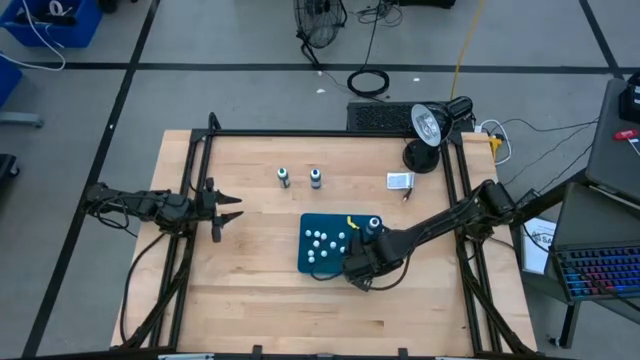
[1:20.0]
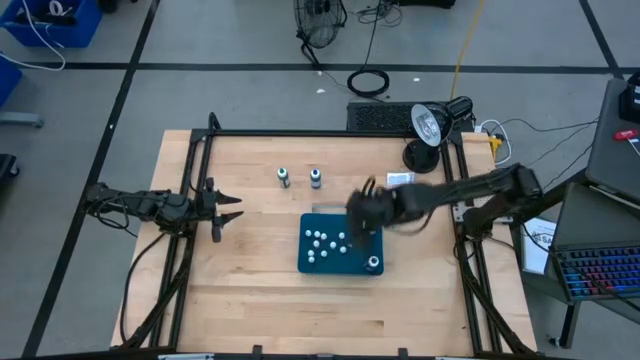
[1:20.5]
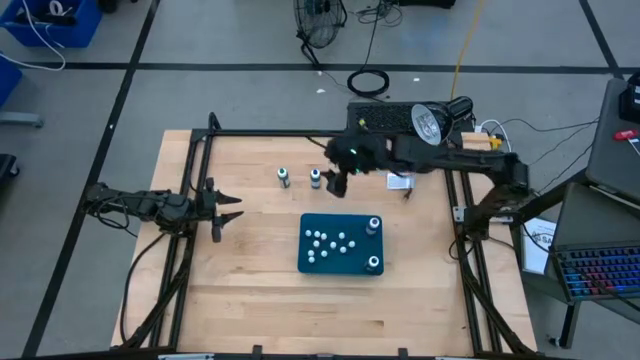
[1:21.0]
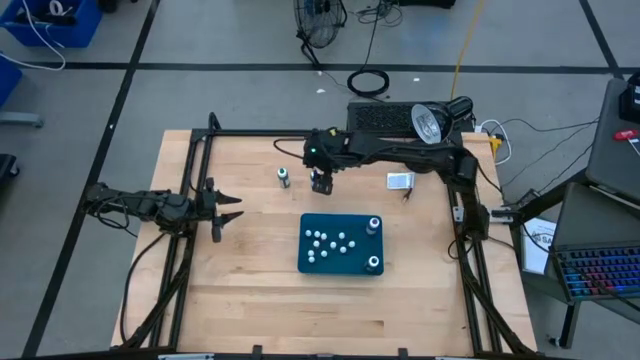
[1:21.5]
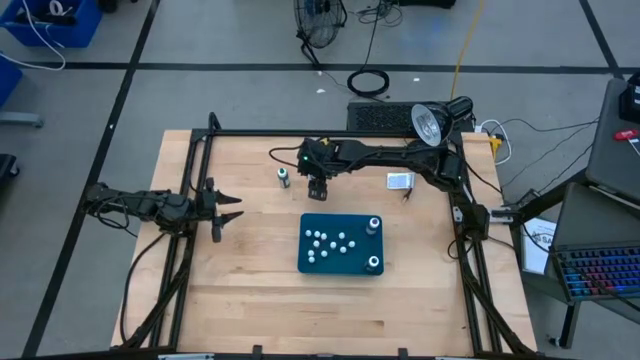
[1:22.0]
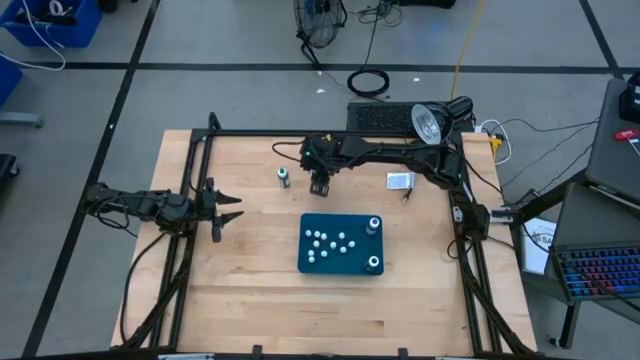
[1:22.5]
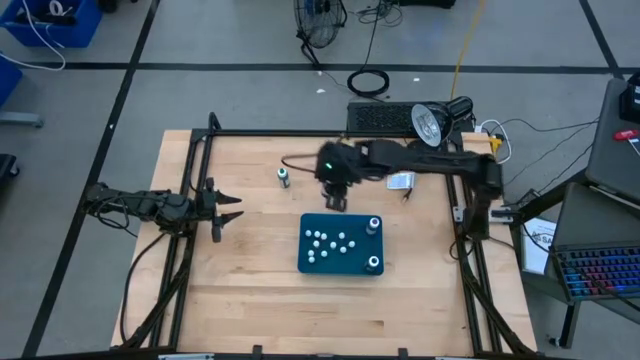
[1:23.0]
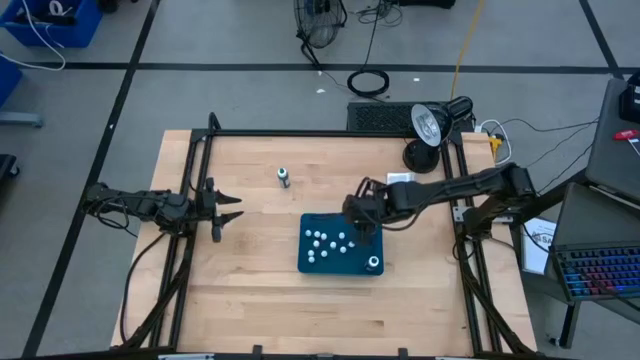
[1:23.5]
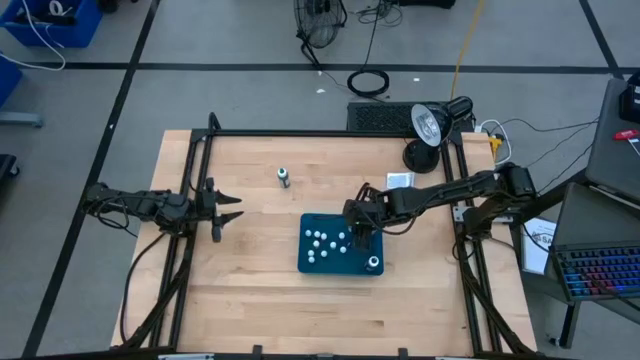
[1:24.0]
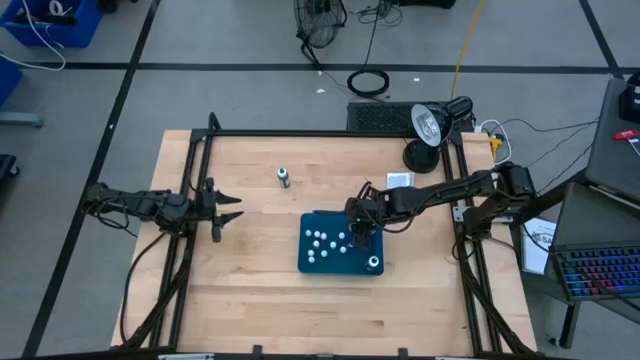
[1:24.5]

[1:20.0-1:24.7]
Task: Pick & Place food coloring
Put the large blue food coloring bottle into the blue bin

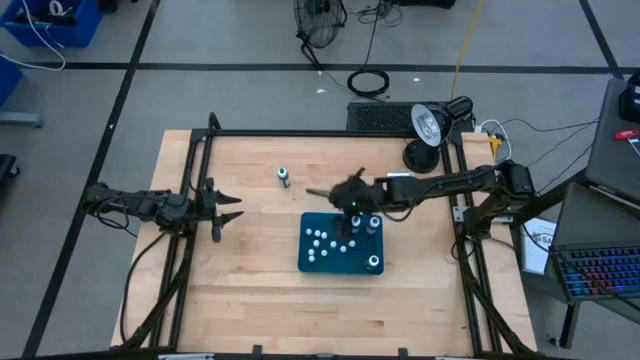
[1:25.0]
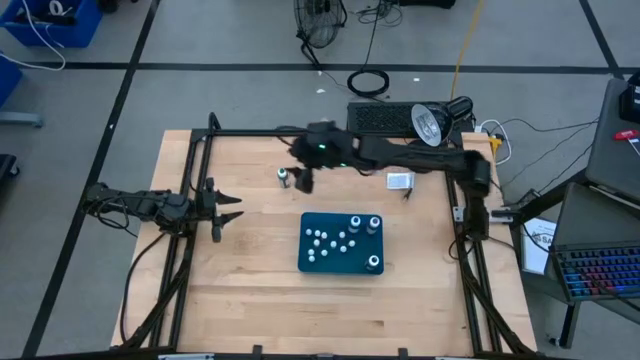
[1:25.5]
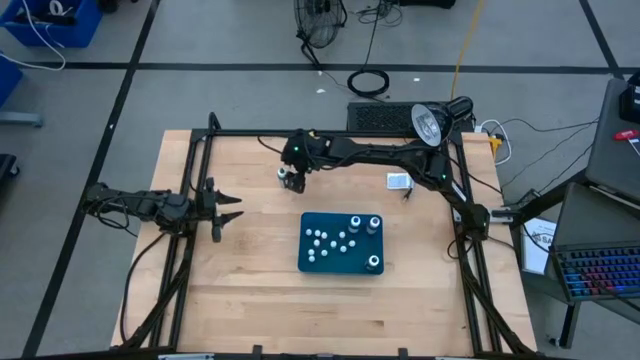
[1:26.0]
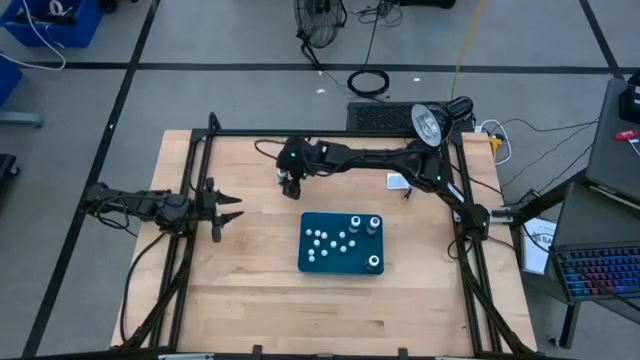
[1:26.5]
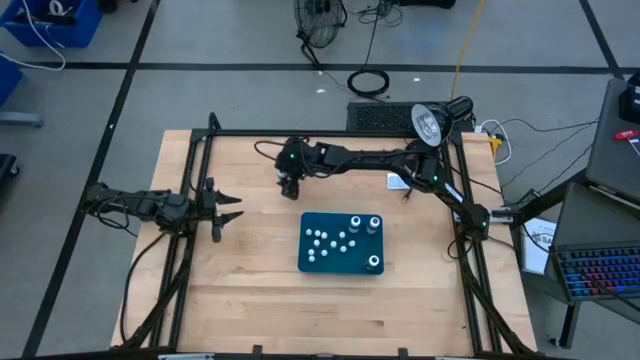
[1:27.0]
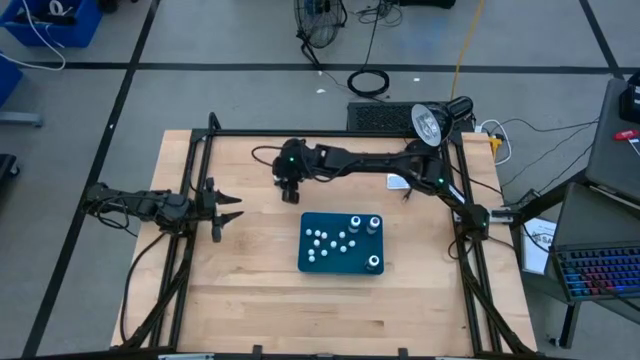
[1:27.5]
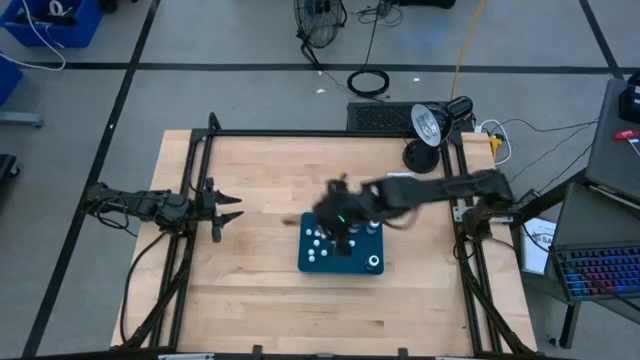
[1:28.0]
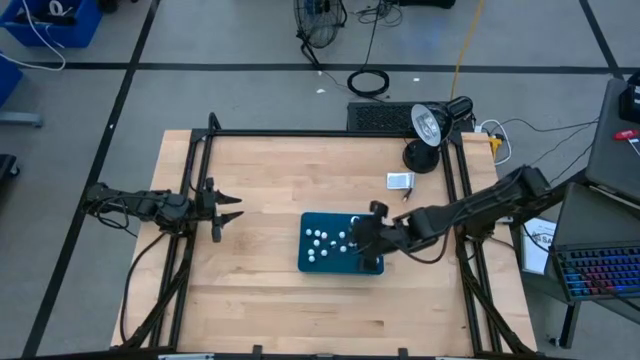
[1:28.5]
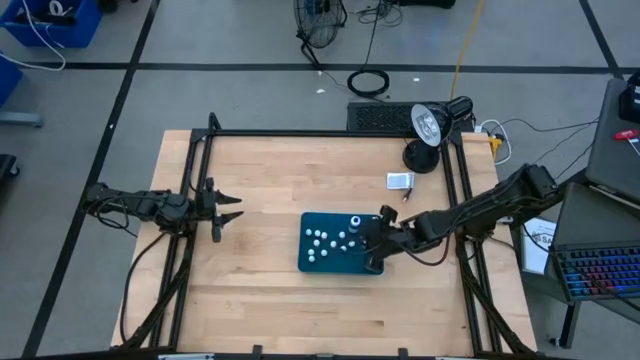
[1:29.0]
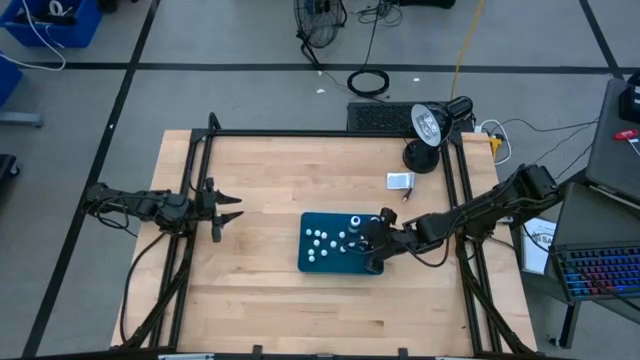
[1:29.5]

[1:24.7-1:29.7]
Put the large green food coloring bottle into the blue bin

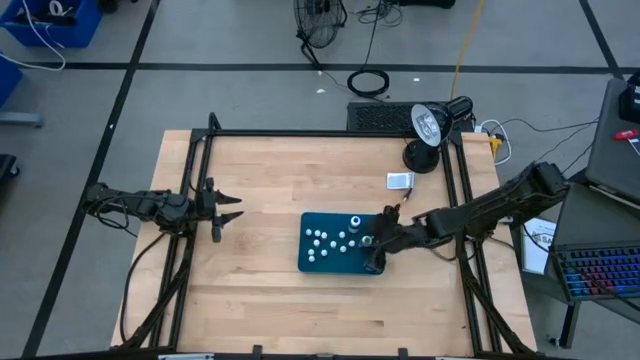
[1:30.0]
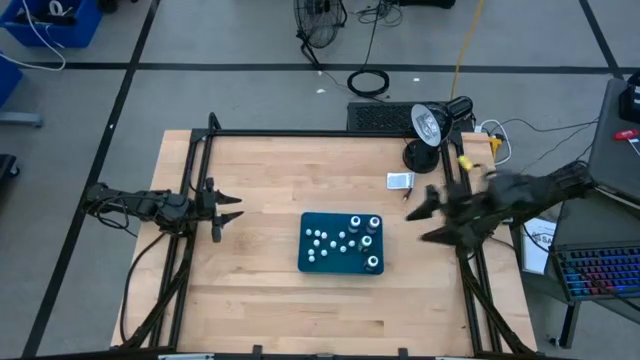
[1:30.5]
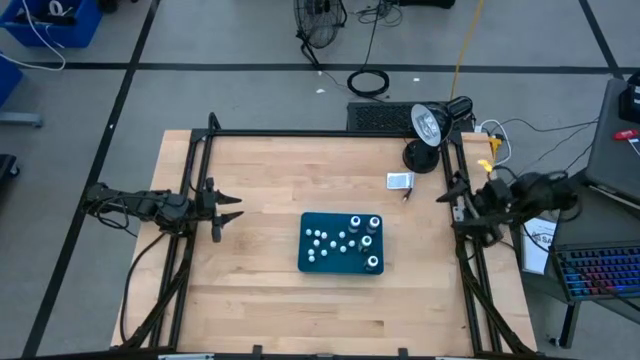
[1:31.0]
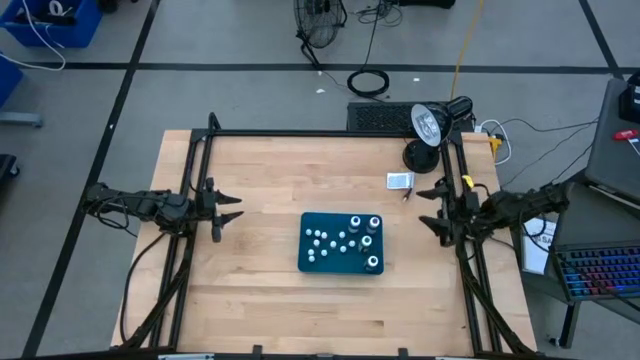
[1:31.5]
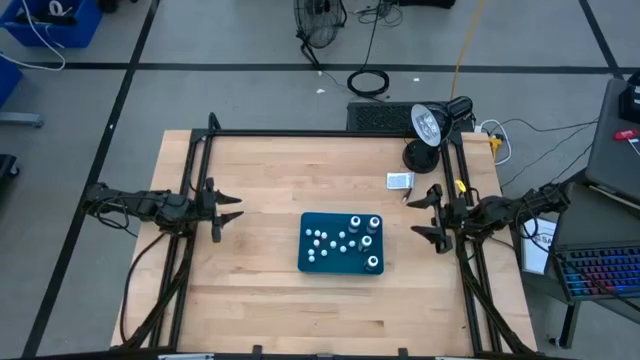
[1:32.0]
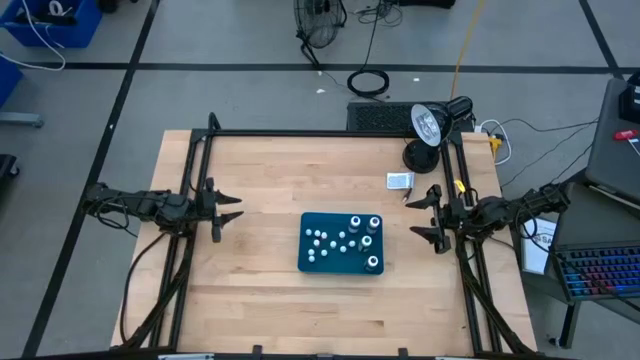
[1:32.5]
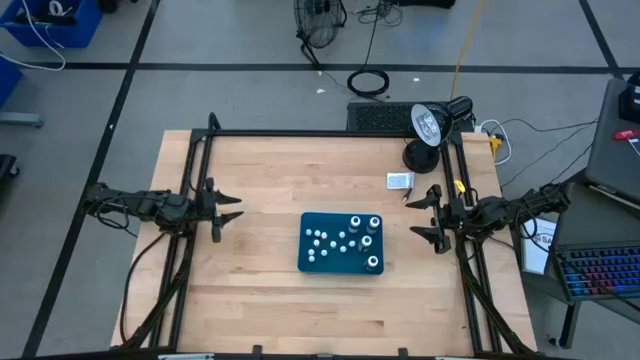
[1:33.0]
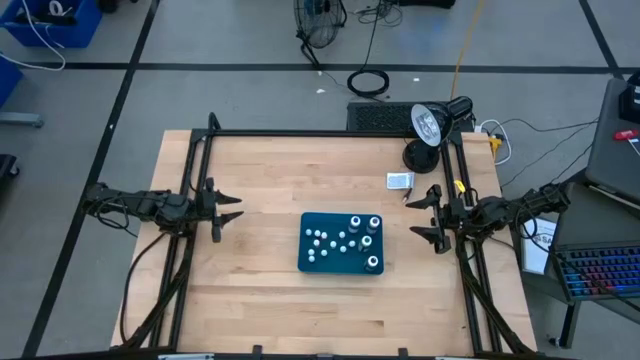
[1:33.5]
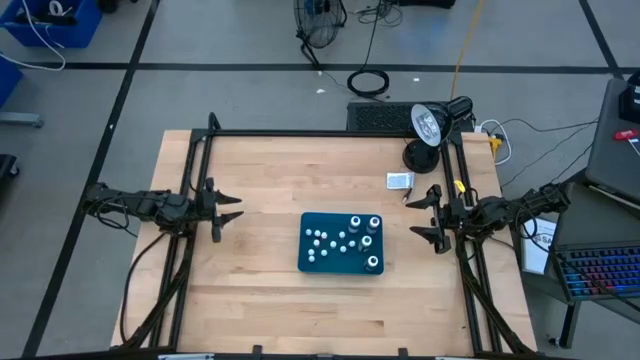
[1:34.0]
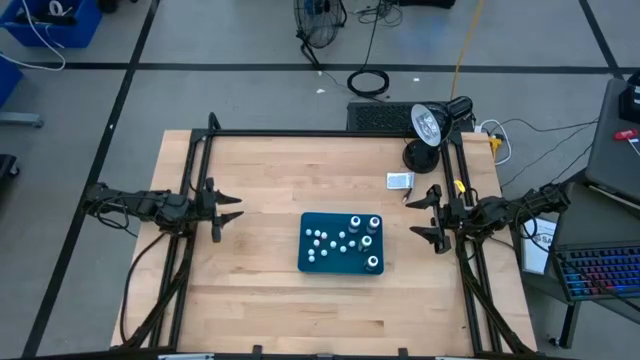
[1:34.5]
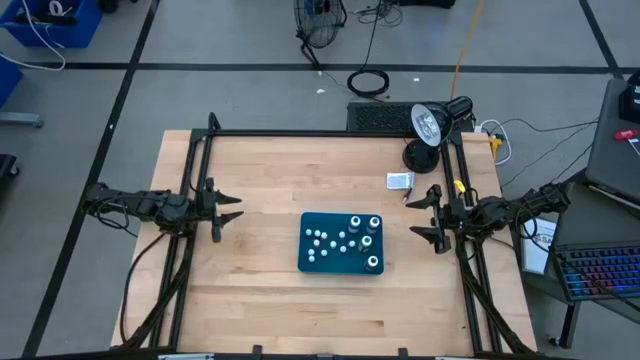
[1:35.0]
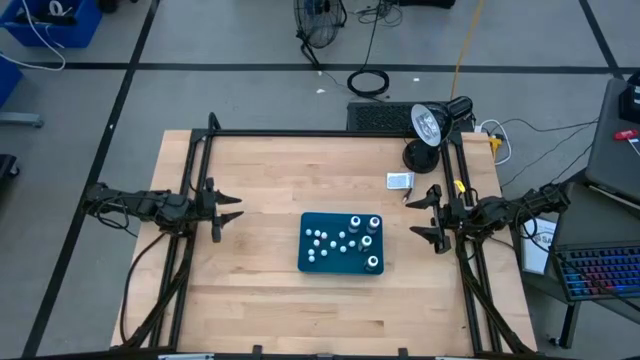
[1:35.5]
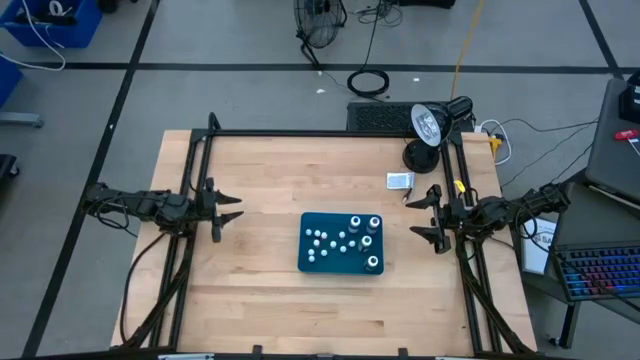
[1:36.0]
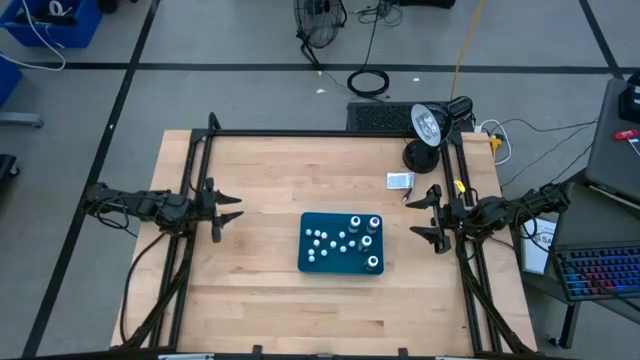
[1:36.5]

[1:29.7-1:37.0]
Return to Home Position

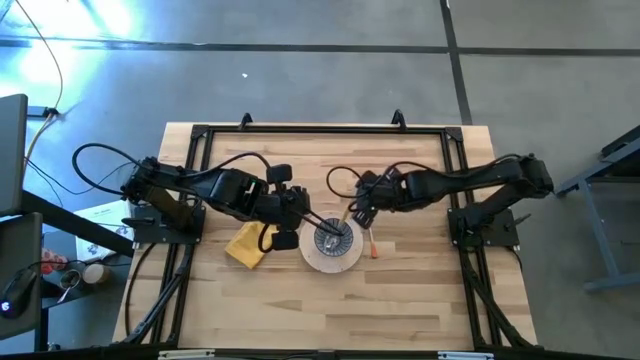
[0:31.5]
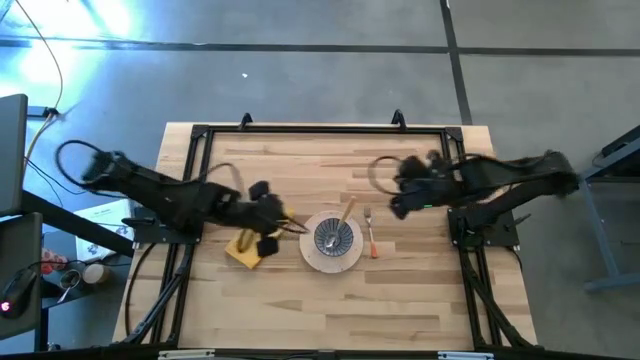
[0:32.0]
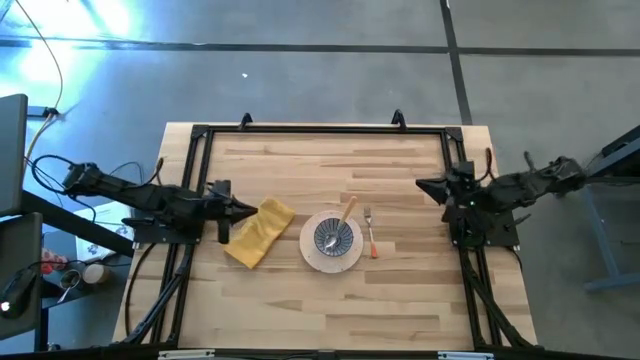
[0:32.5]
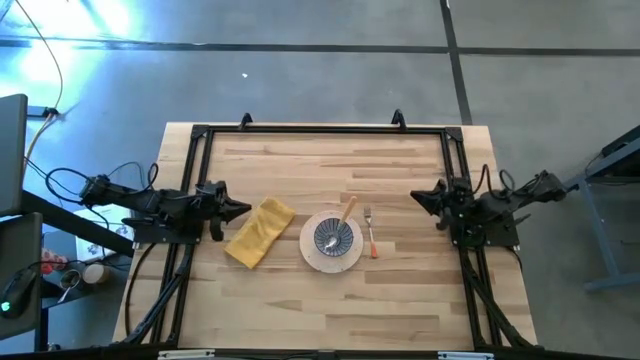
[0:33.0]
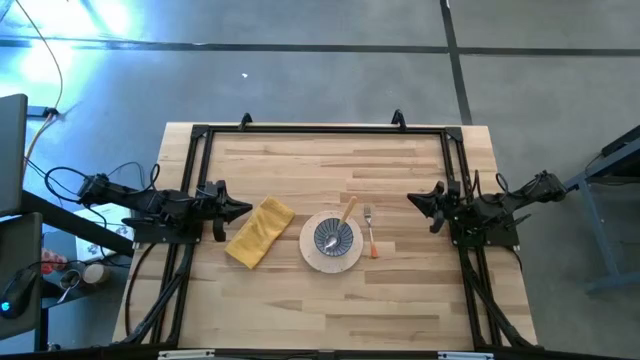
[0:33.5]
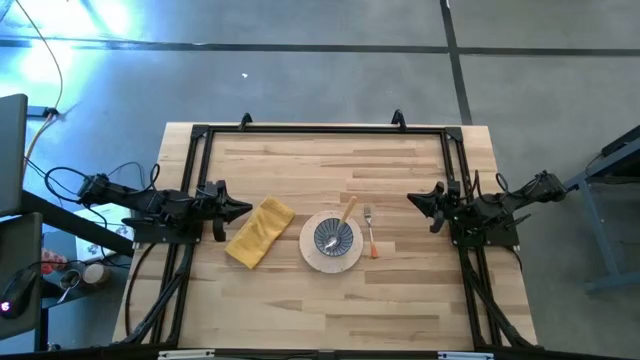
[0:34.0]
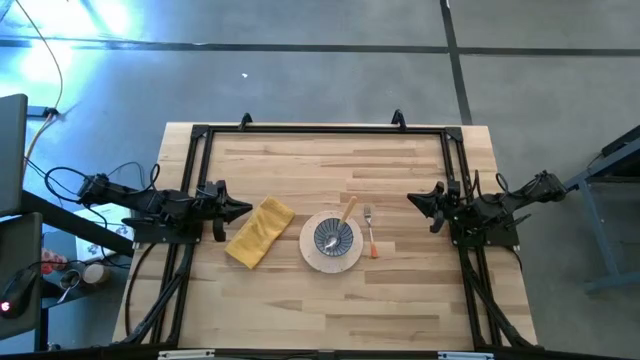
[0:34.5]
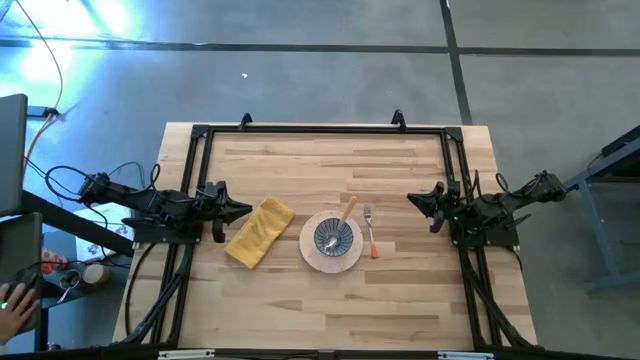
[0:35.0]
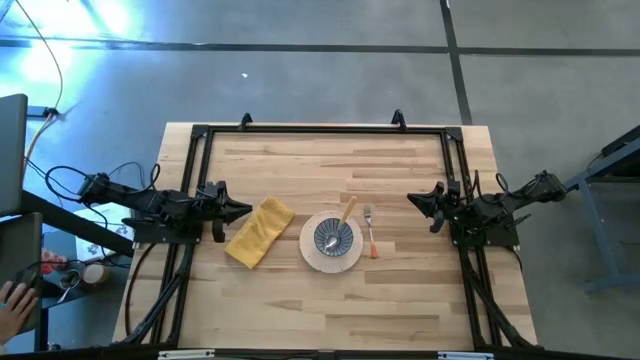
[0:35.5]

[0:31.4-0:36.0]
Task: Set table place
Return to Home Position
